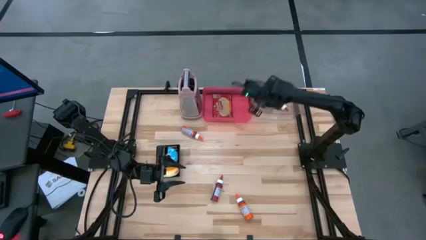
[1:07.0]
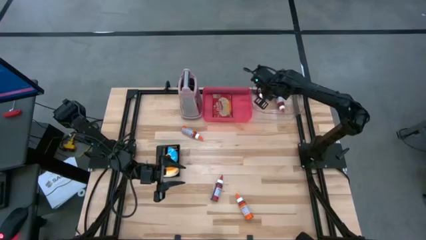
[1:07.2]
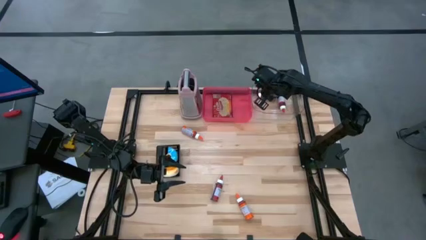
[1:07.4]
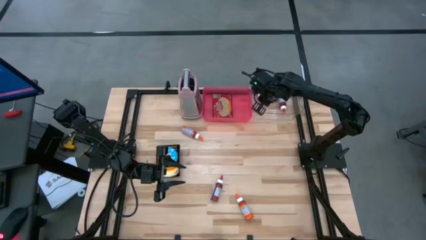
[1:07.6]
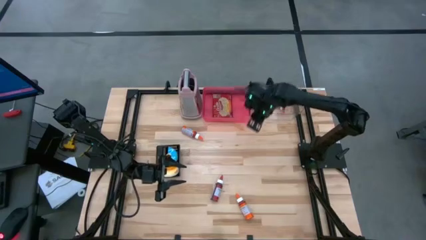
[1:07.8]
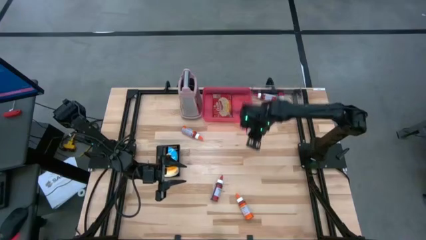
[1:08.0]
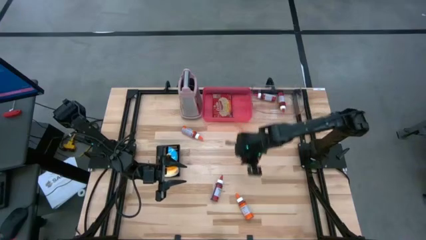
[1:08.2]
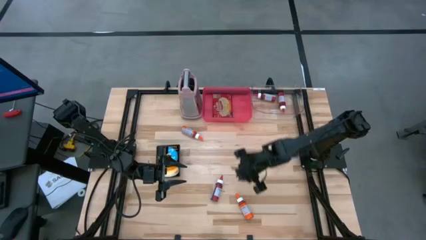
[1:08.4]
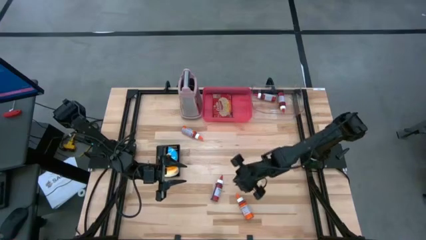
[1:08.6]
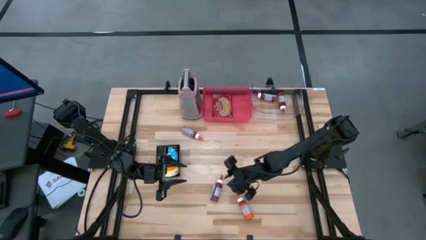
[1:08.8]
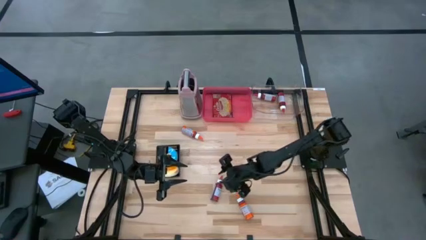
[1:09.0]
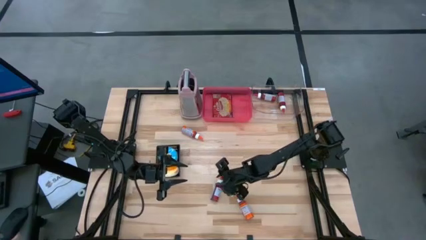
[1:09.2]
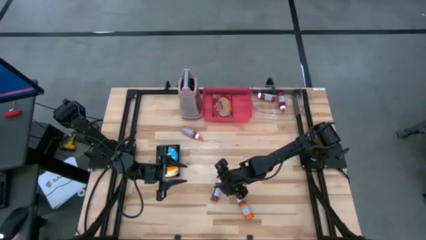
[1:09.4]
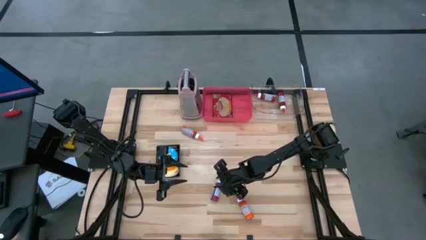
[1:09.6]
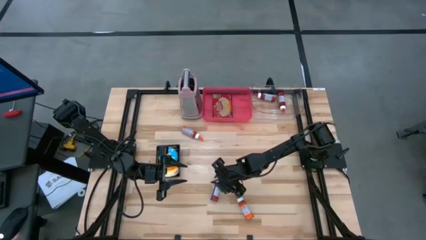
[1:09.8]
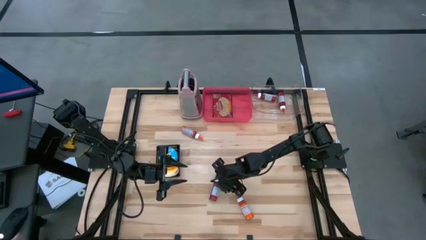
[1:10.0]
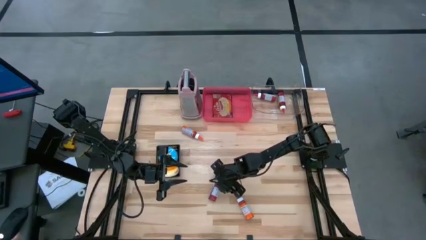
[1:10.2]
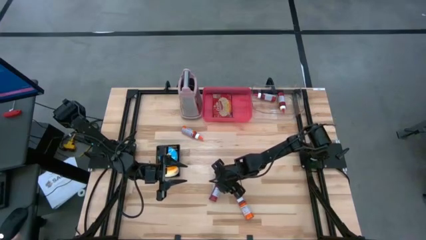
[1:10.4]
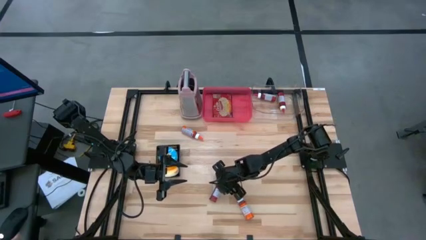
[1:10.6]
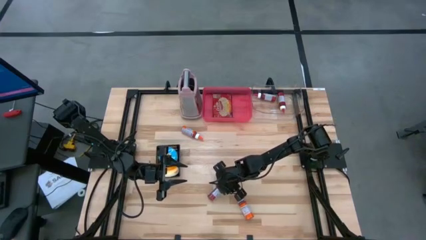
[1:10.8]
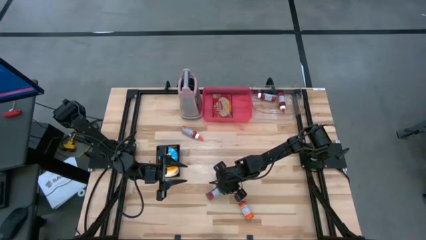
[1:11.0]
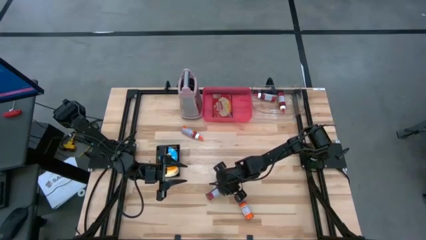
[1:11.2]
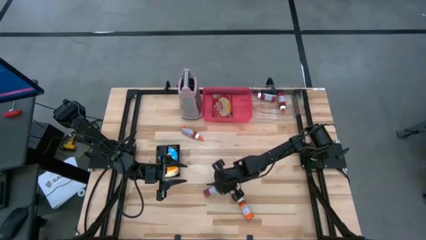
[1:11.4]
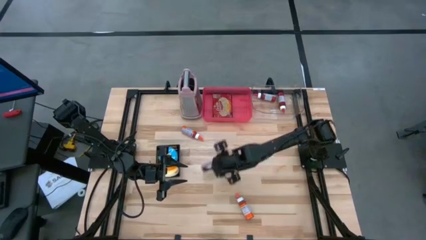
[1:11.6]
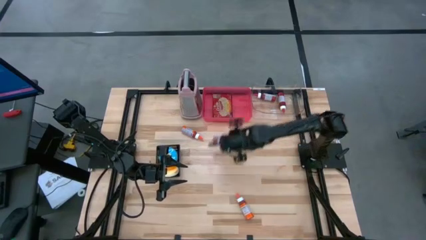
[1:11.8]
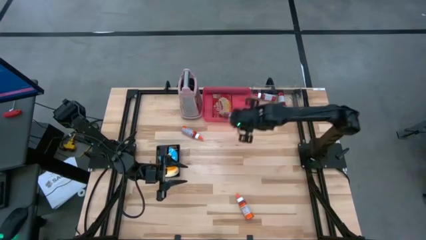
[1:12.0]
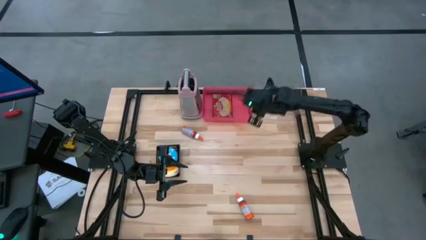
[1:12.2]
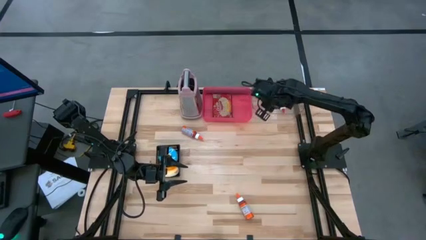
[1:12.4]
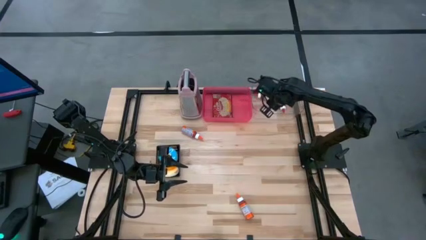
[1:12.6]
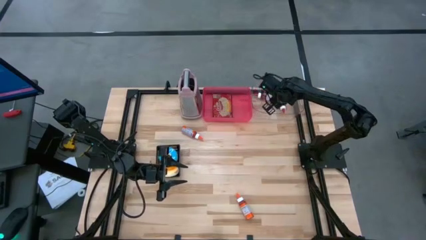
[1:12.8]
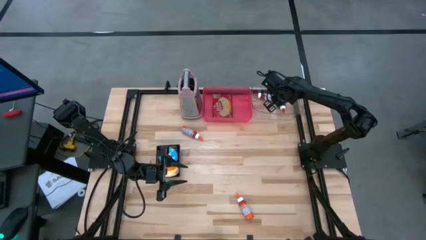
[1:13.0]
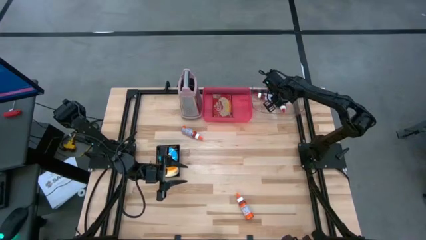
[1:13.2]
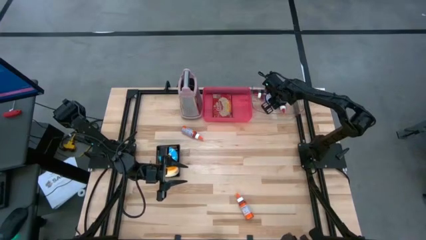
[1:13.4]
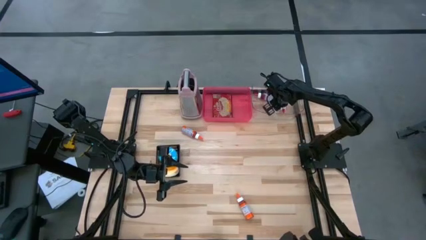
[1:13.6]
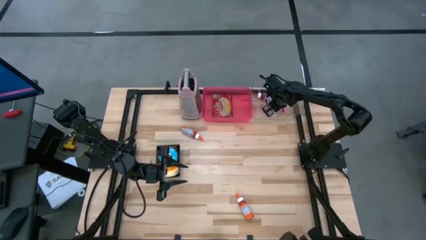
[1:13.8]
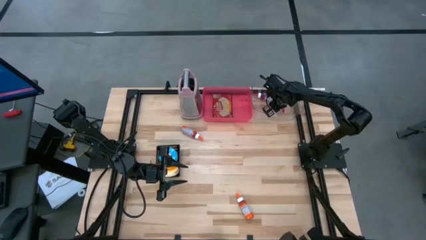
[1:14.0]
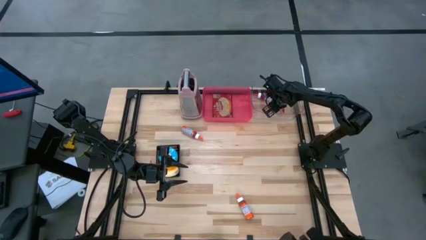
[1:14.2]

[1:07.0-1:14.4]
Put the red food coloring bottle into the transparent bin

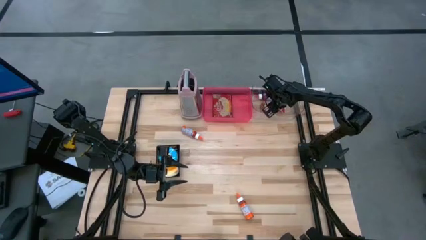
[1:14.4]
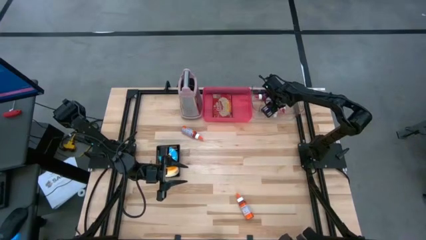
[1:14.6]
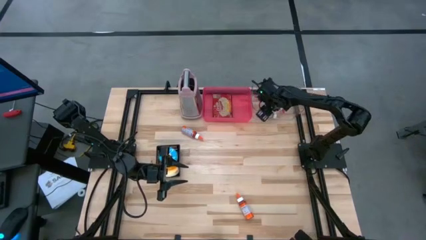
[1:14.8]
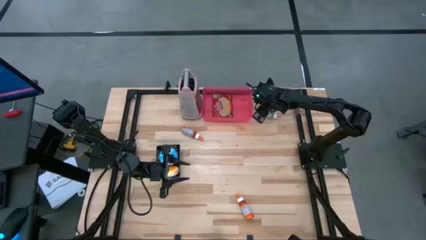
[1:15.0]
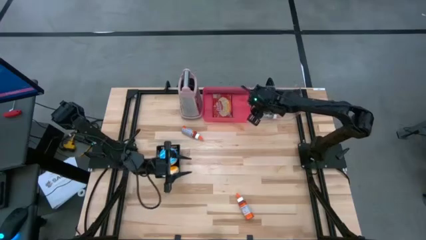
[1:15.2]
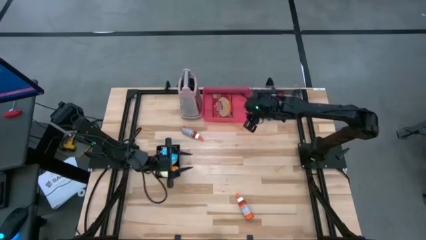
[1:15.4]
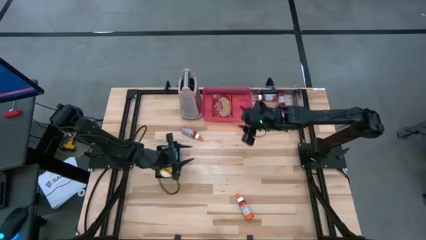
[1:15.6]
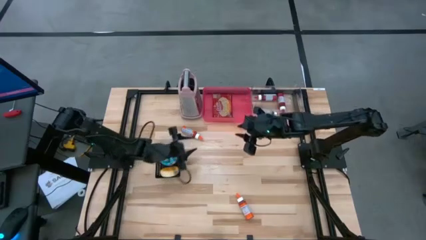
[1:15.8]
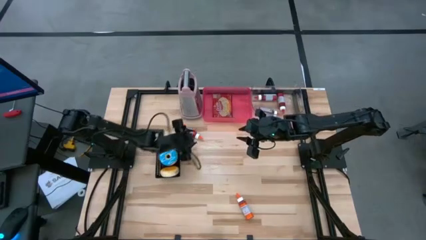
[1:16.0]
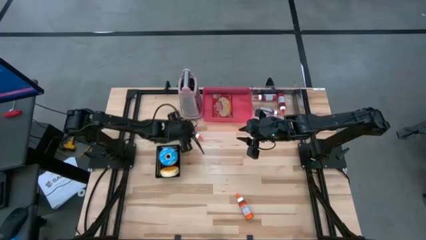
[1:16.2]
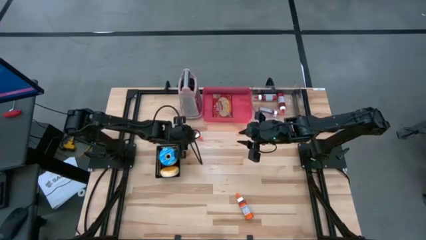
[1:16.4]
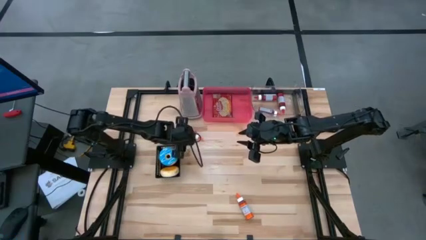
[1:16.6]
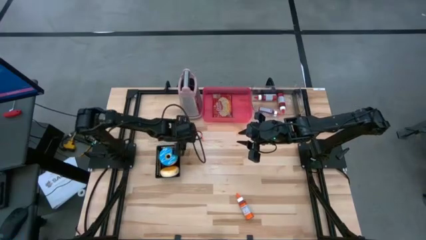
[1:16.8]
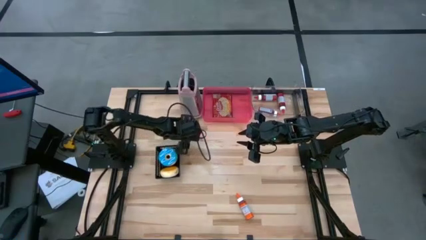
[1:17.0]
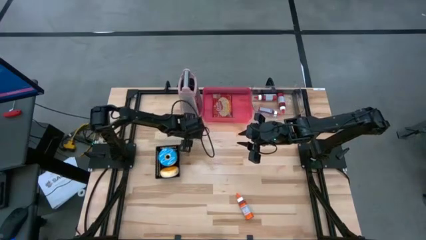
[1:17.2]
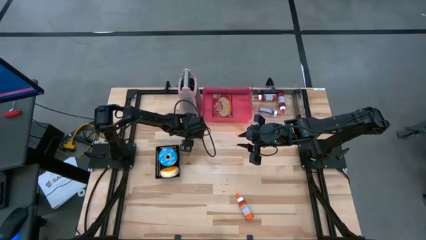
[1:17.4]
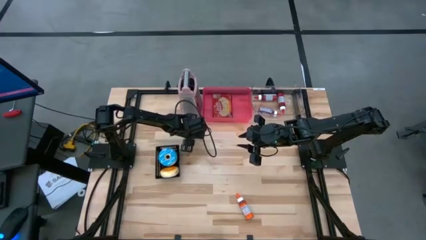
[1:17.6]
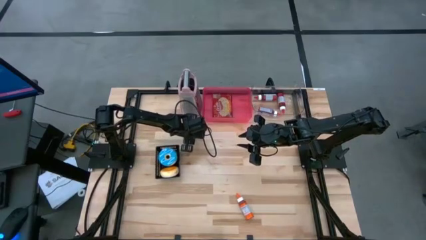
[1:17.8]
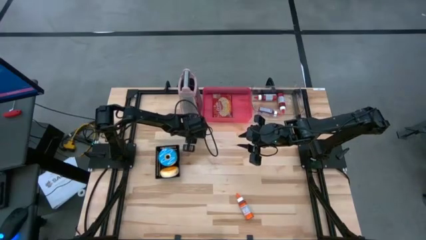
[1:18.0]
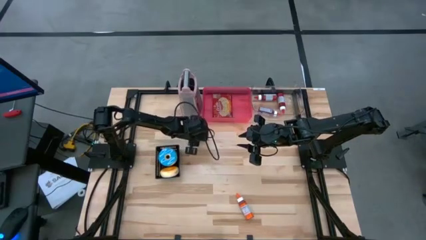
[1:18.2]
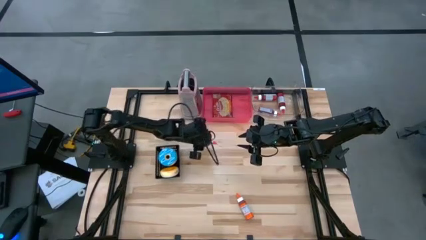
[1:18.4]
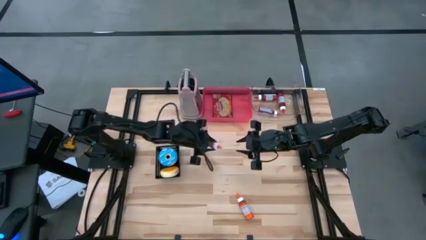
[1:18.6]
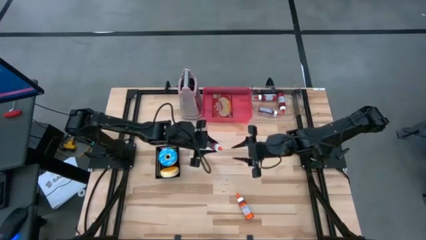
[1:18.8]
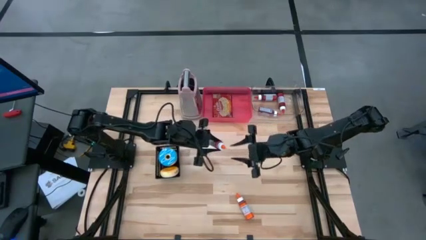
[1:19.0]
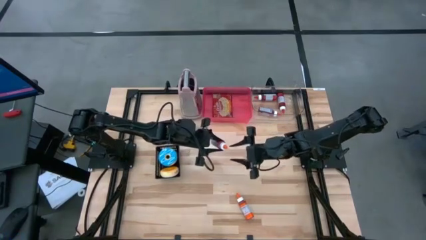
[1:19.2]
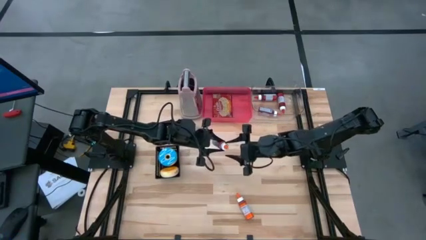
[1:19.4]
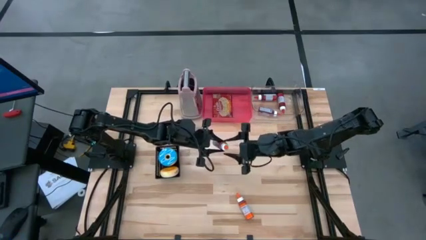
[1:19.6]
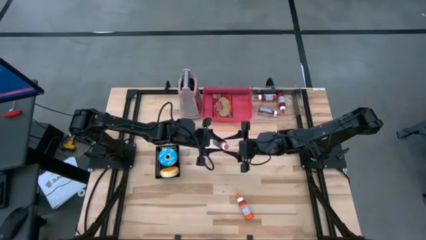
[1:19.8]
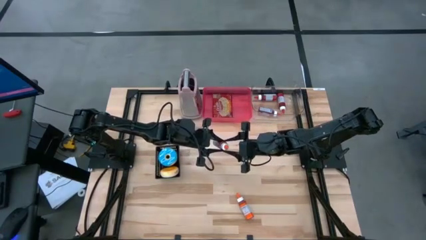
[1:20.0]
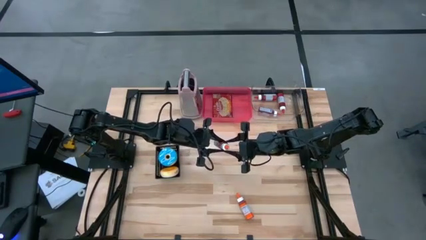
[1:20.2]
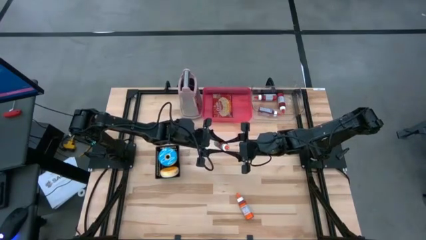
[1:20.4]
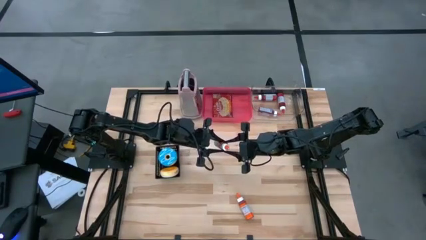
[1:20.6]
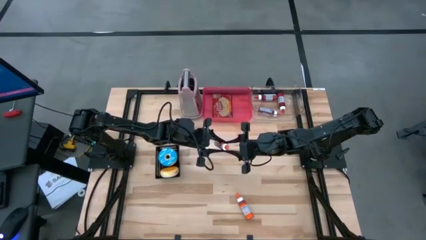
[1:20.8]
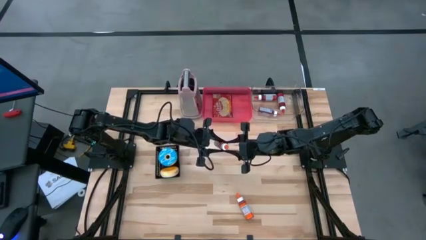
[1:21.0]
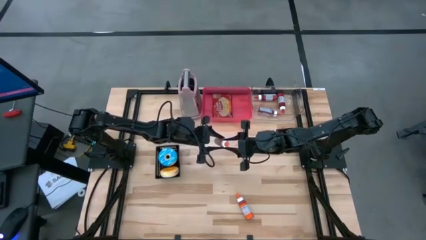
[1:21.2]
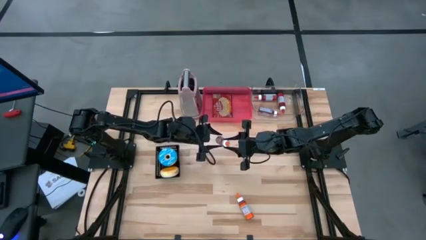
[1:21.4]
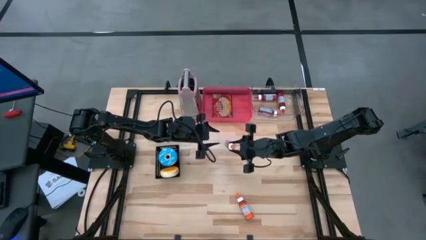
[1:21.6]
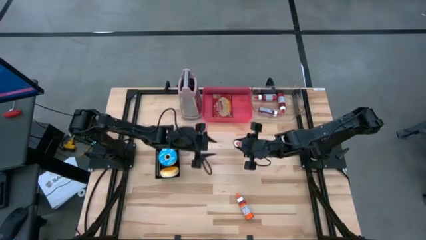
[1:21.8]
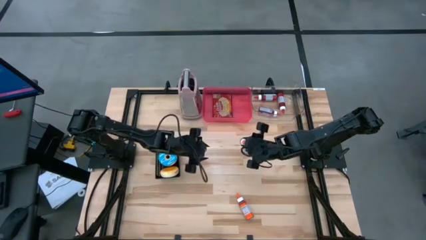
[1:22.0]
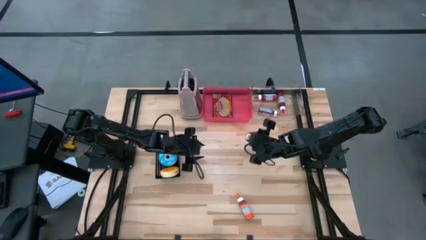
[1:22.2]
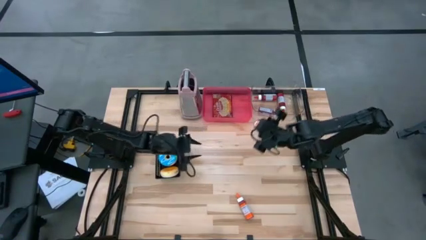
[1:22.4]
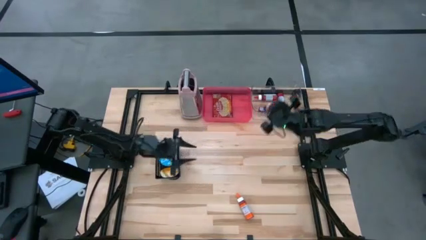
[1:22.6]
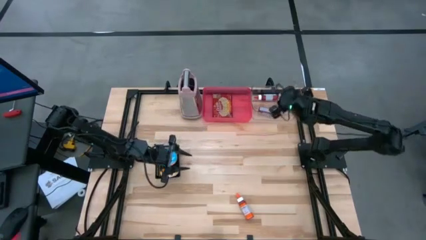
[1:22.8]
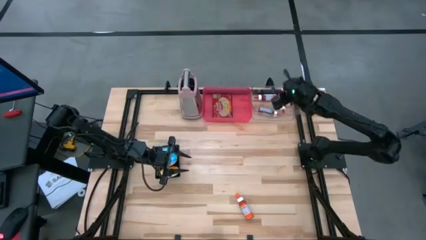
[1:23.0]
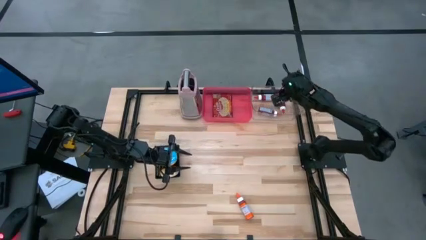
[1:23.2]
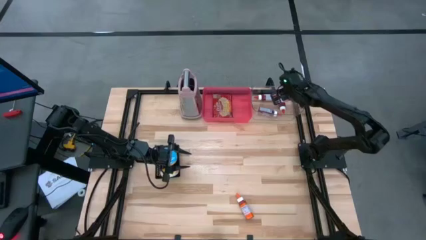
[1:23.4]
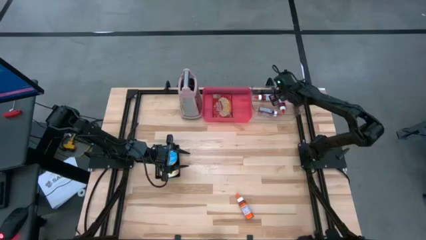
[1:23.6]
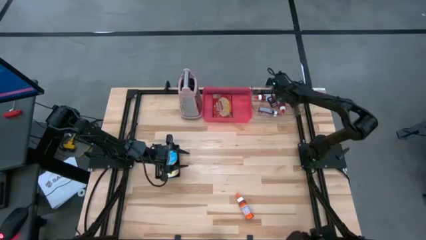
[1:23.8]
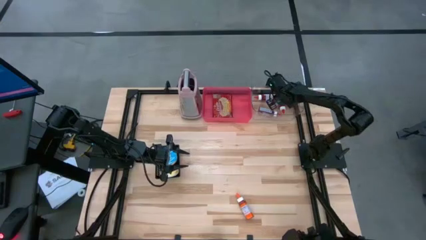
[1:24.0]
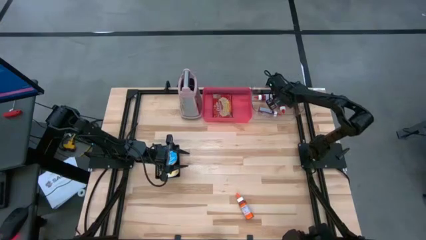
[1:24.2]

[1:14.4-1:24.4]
Put the top orange food coloring bottle into the transparent bin
